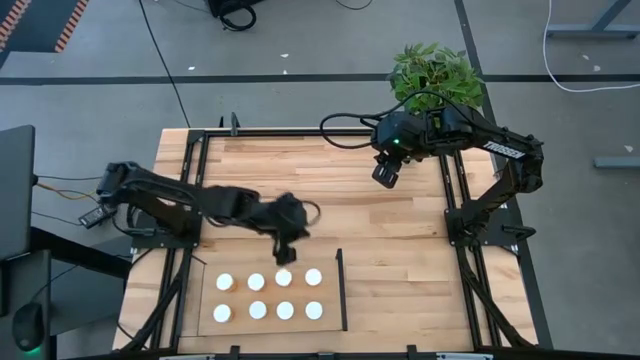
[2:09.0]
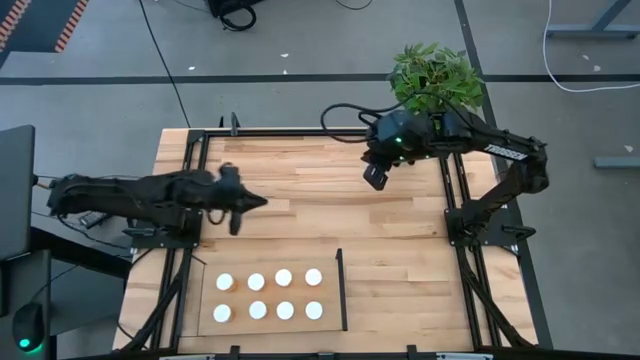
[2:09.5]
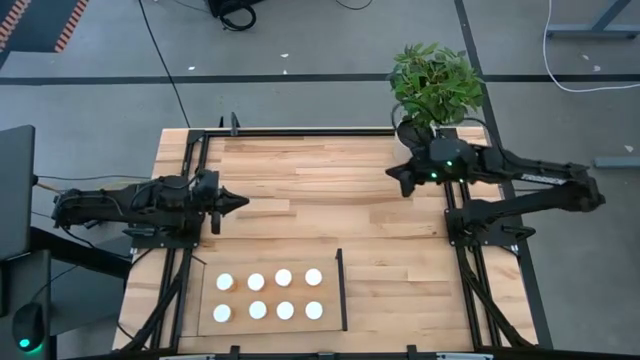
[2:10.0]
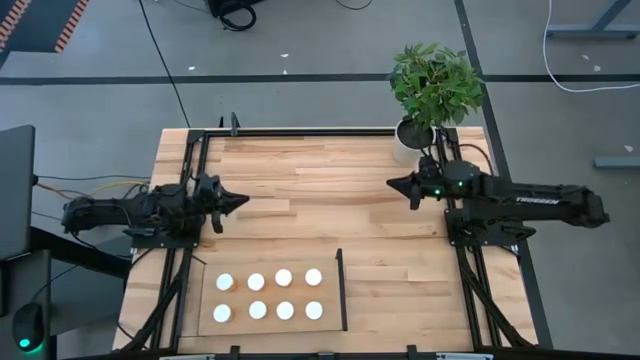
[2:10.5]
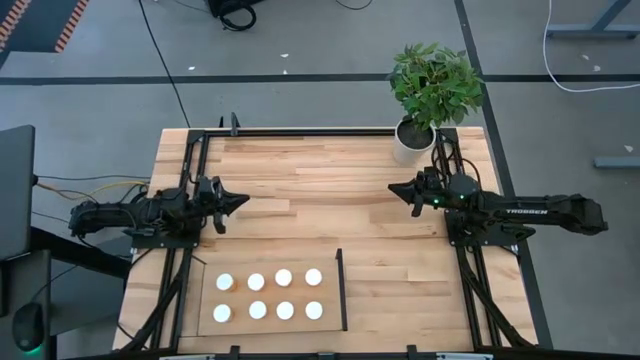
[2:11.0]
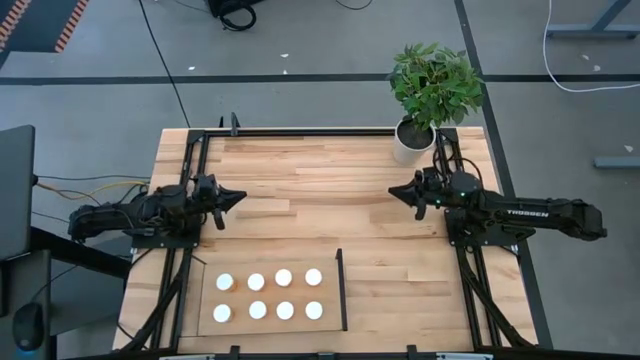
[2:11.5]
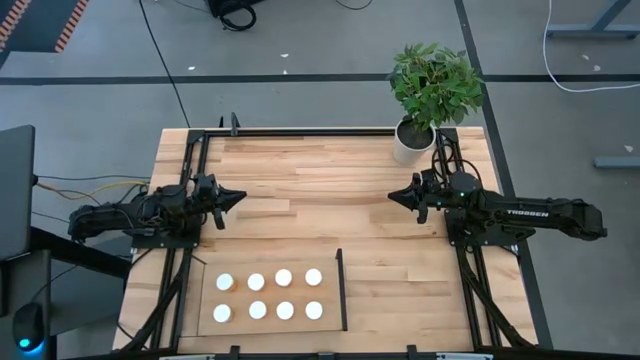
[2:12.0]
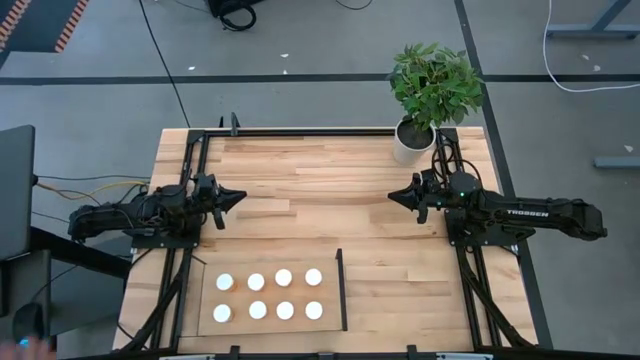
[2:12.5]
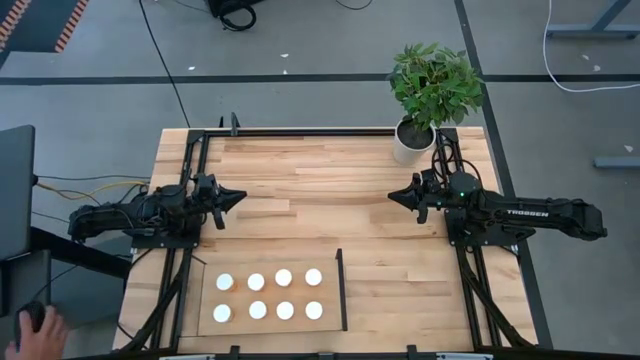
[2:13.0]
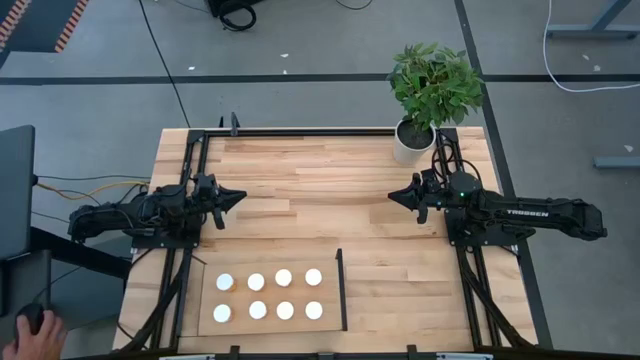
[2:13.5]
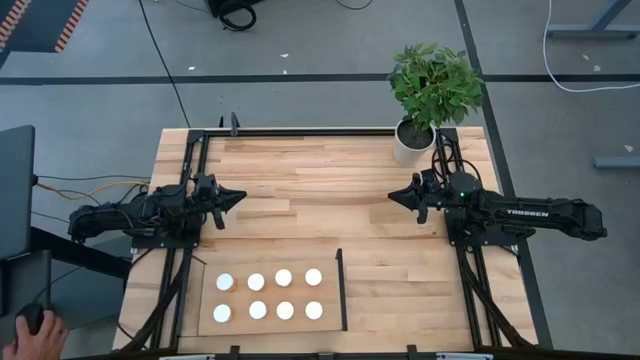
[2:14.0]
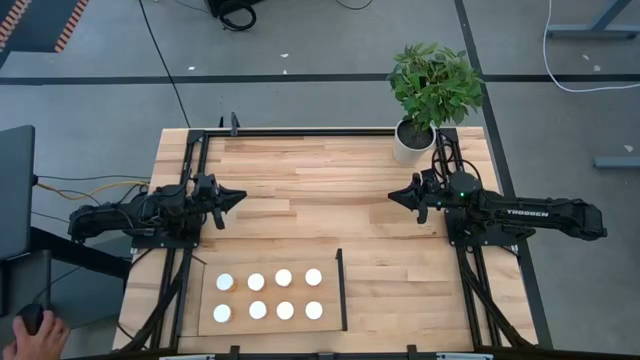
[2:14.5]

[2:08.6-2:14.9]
Task: Pick and place medicine bottles onto shelf by color
Return to Home Position

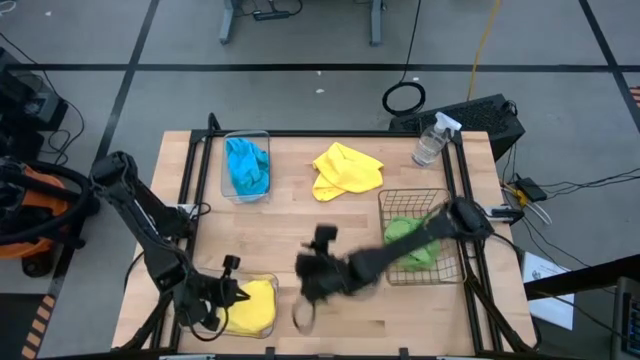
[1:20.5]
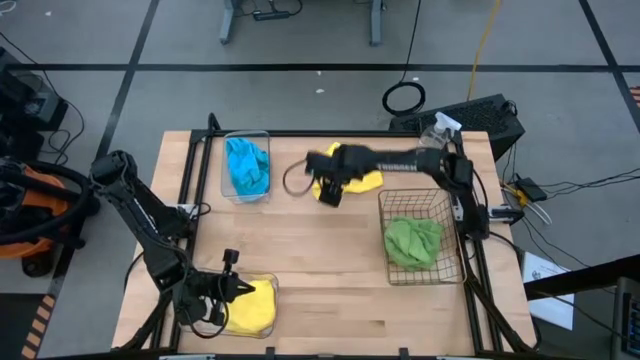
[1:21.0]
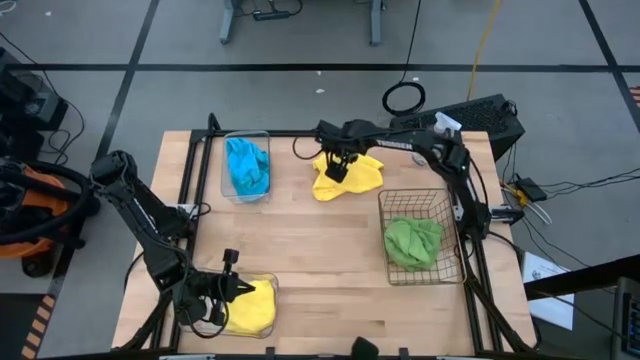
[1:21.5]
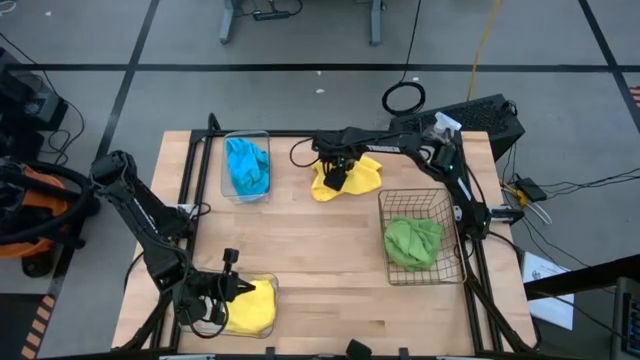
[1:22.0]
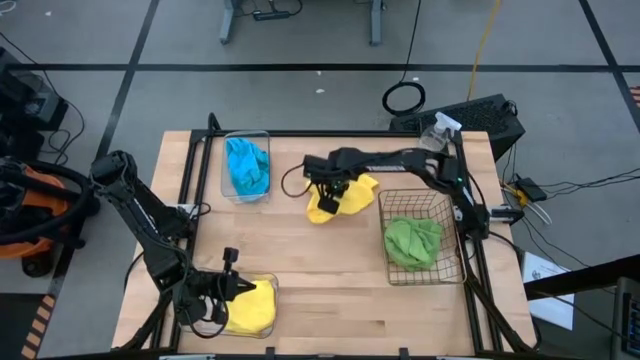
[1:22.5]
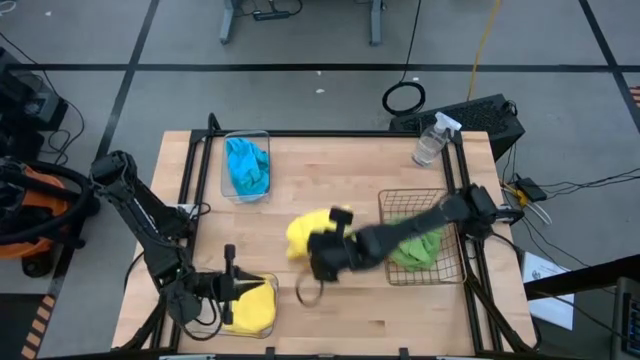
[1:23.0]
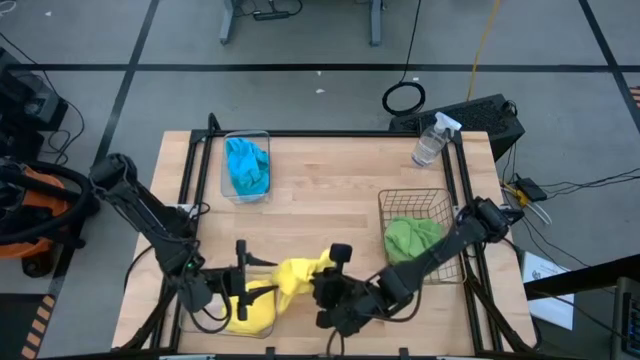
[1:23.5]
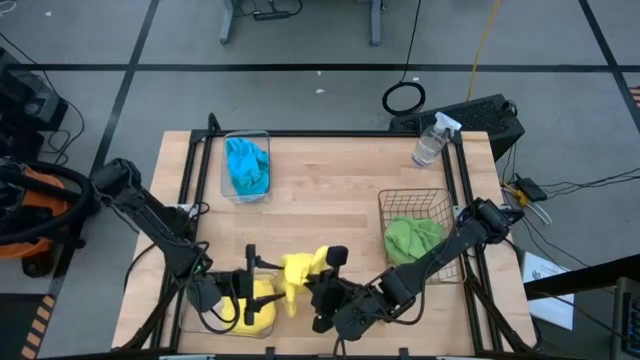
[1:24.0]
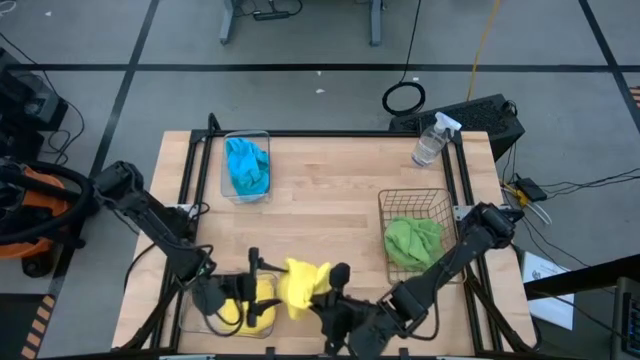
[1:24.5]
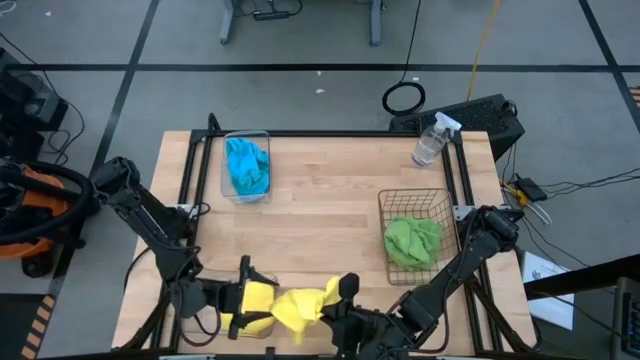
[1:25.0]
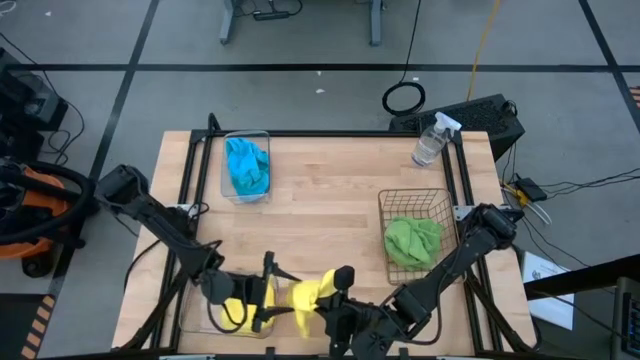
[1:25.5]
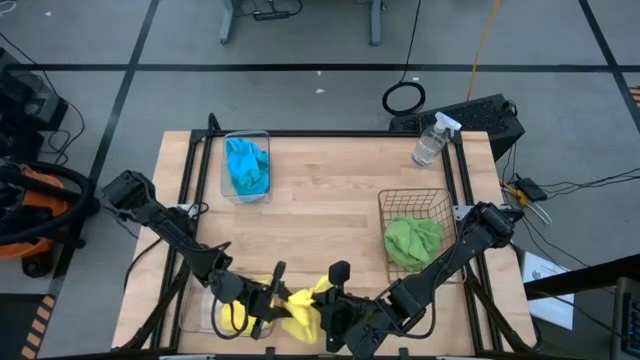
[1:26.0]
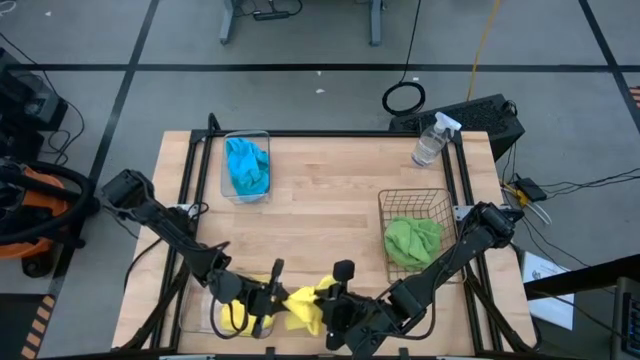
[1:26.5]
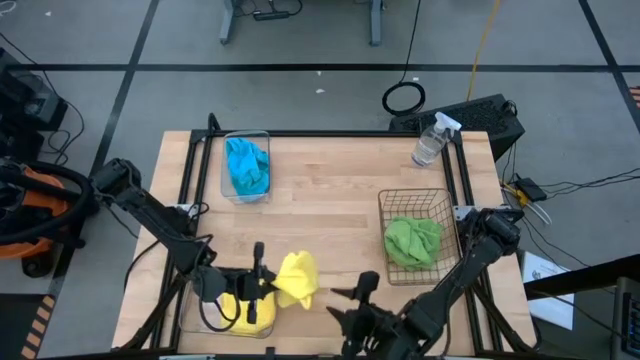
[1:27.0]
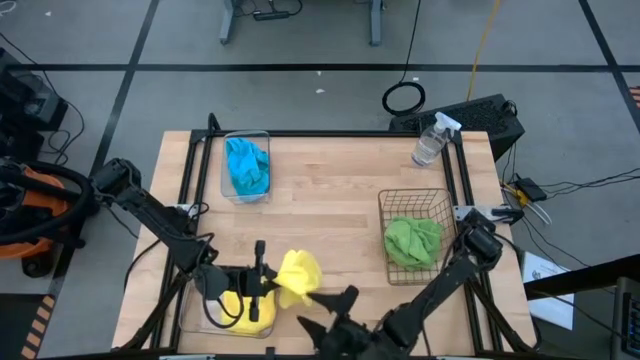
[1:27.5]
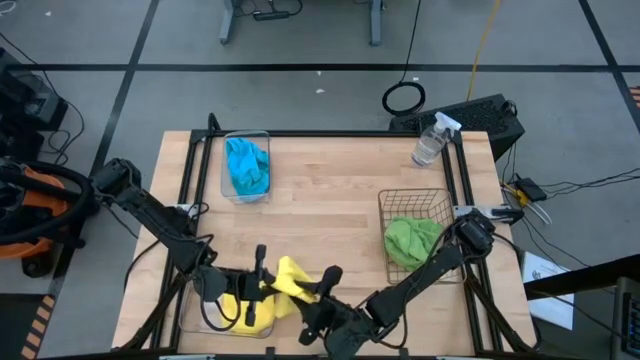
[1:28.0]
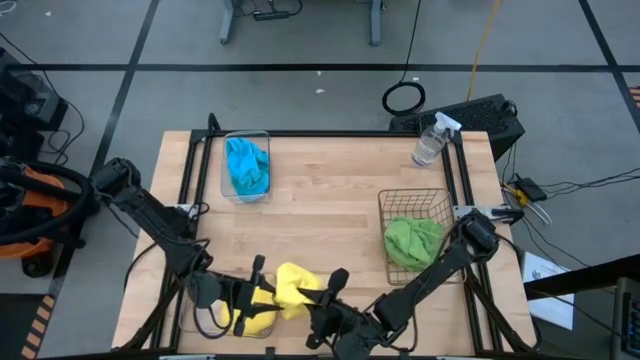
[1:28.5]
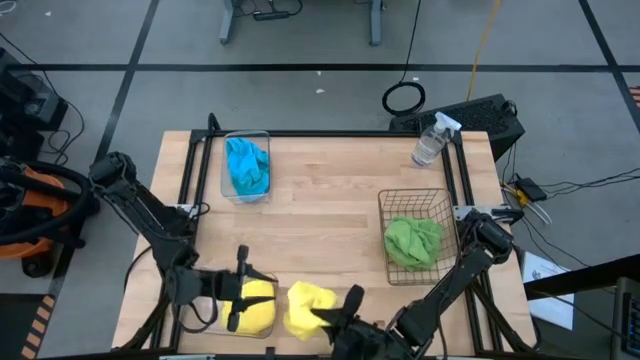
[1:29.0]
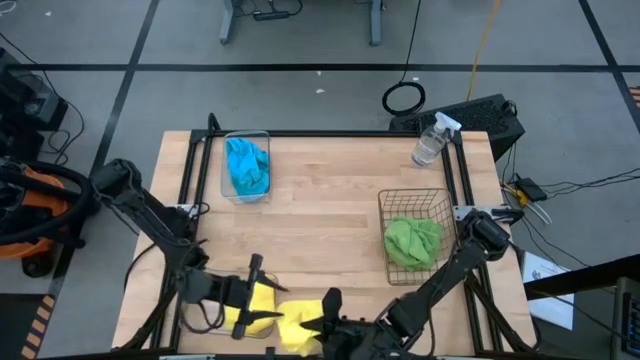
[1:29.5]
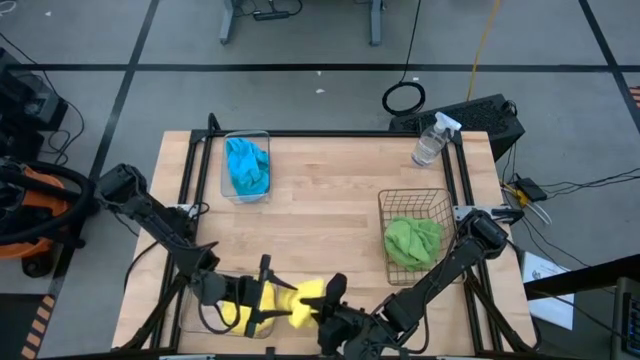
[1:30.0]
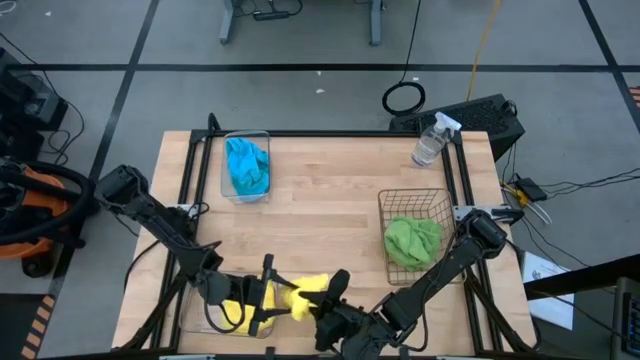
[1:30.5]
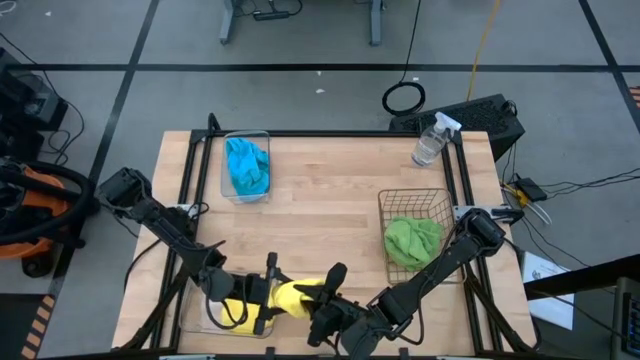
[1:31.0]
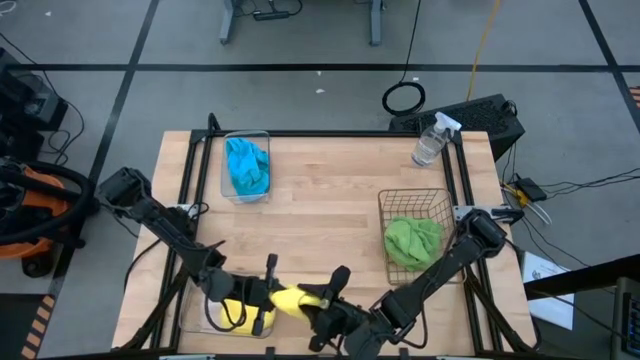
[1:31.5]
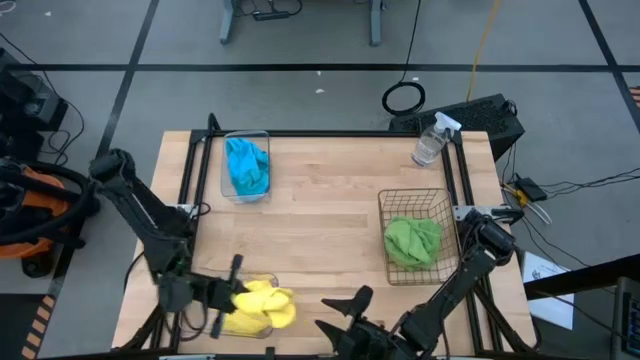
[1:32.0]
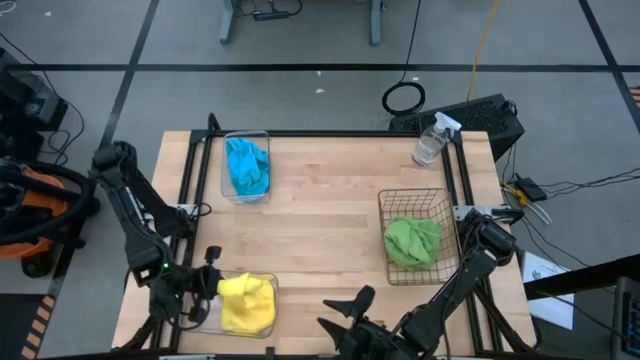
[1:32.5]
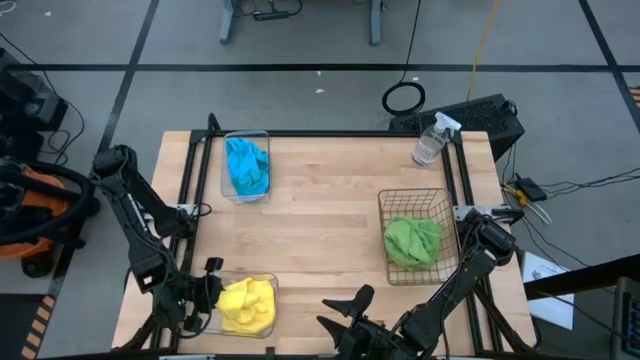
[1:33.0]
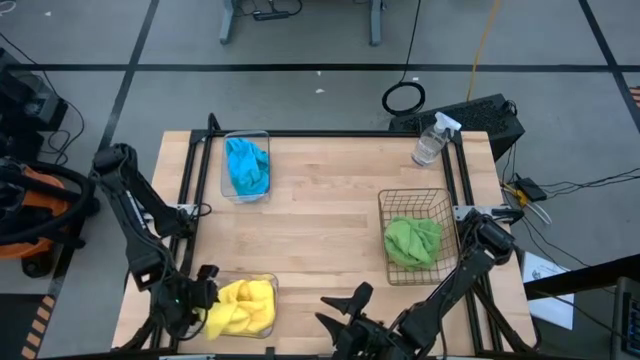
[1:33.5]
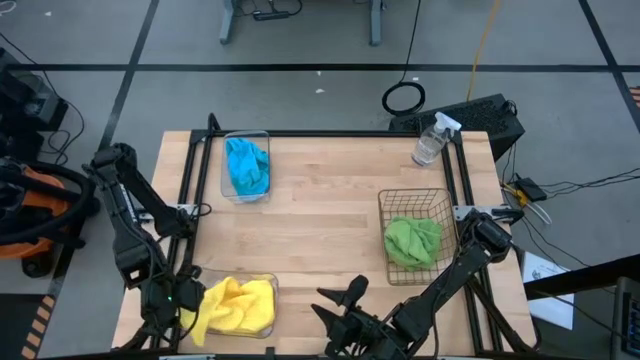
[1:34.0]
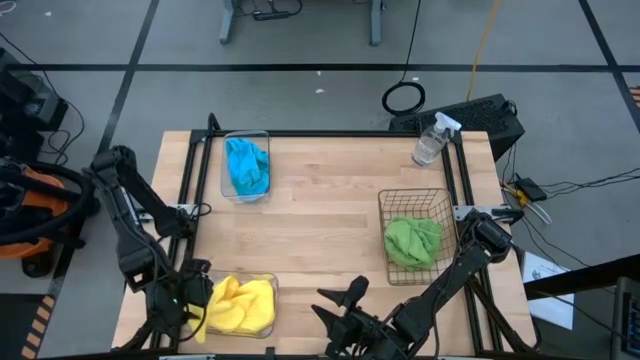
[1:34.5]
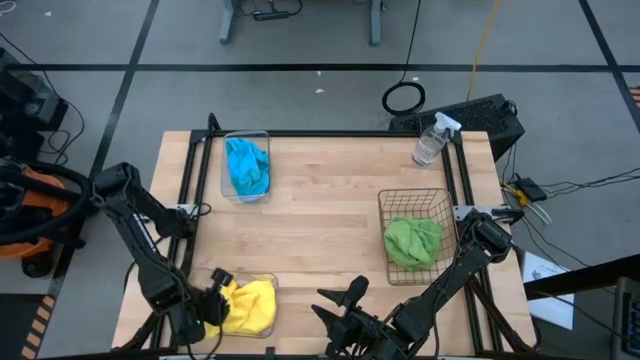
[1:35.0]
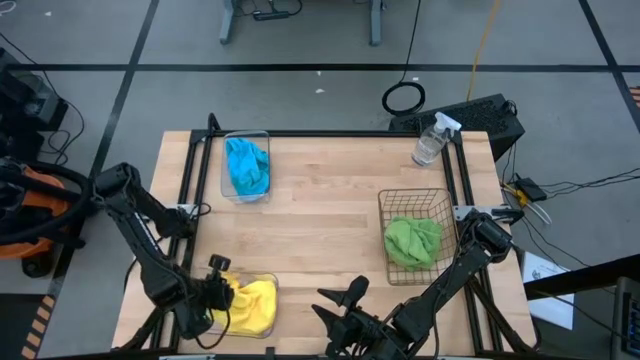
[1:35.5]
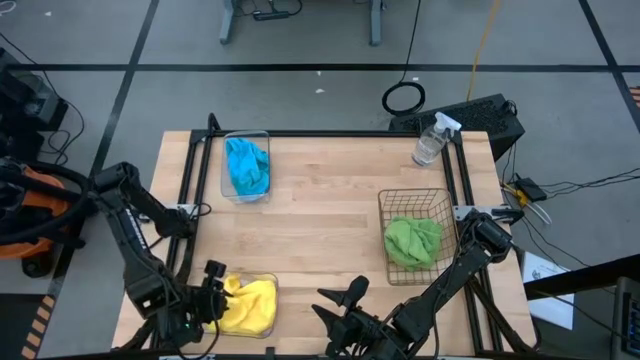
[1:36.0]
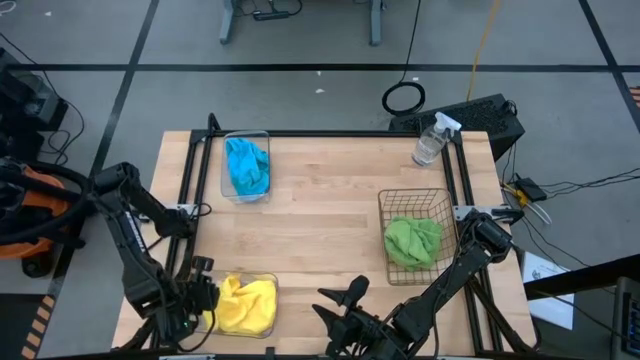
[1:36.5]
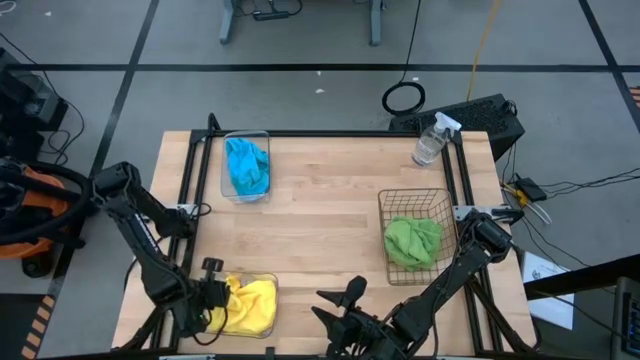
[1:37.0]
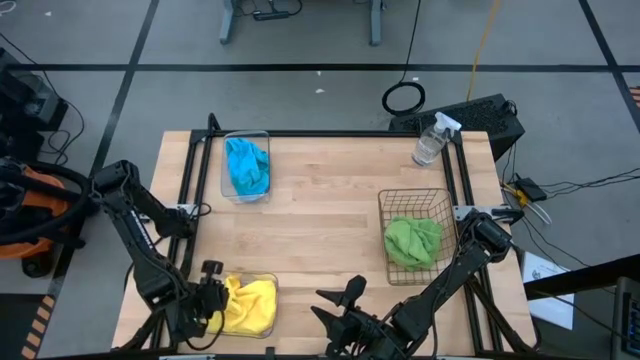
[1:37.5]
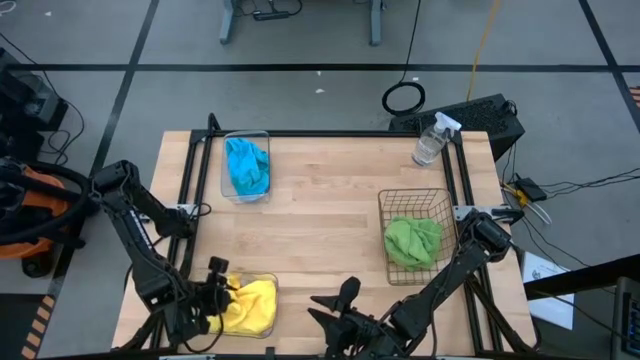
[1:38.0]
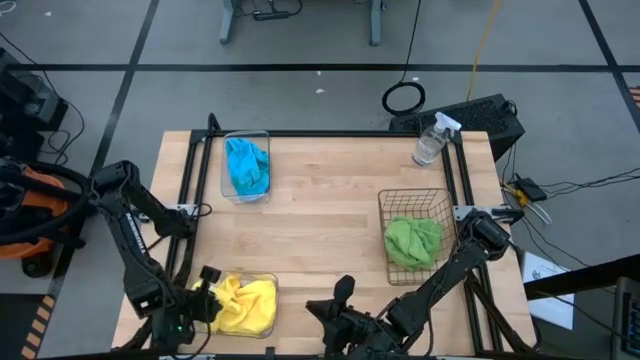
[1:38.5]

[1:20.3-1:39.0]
Task: Sort microfiber towel by color & place in baskets
Put the yellow microfiber cloth into the bottom transparent bin
